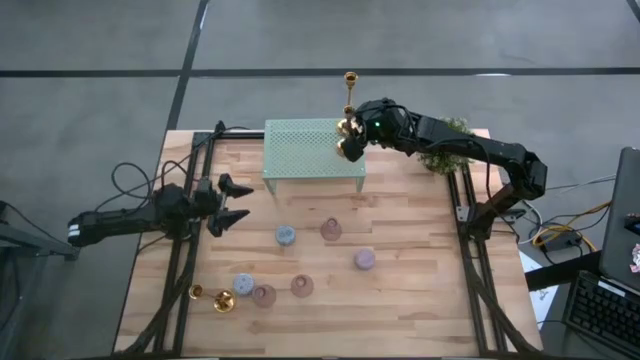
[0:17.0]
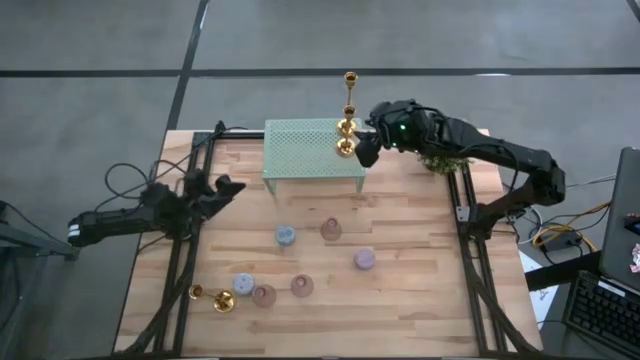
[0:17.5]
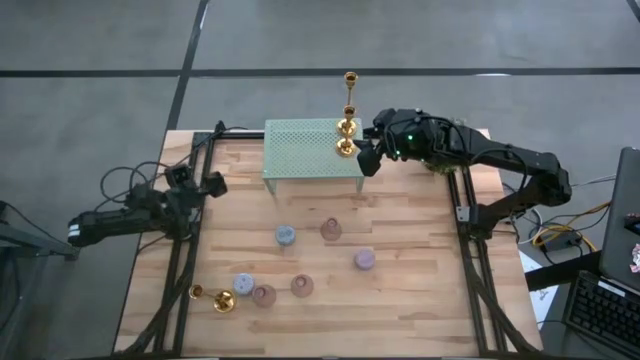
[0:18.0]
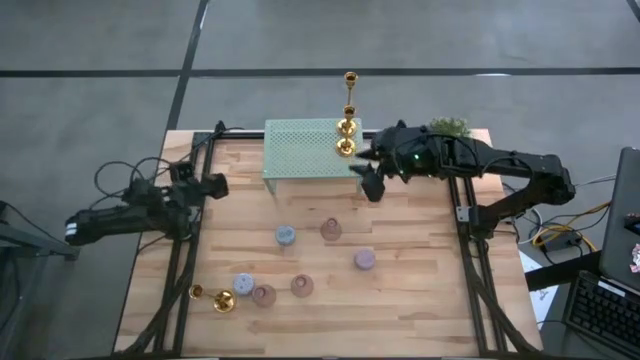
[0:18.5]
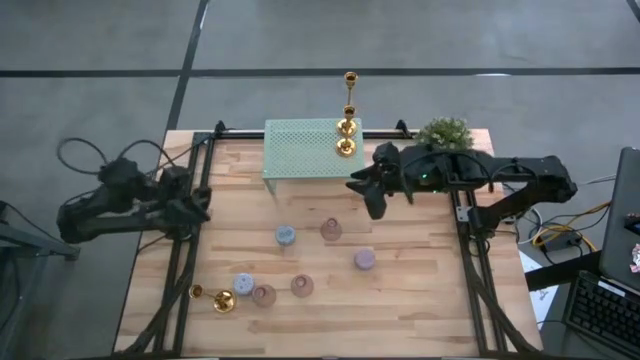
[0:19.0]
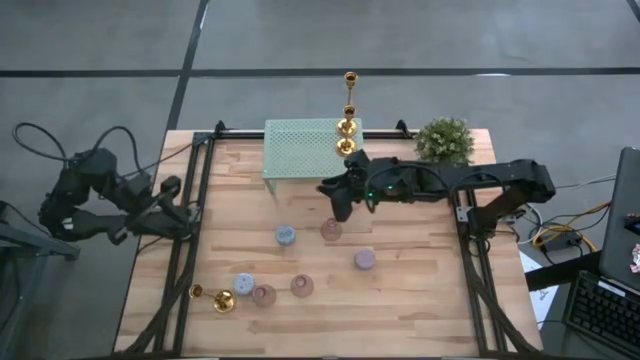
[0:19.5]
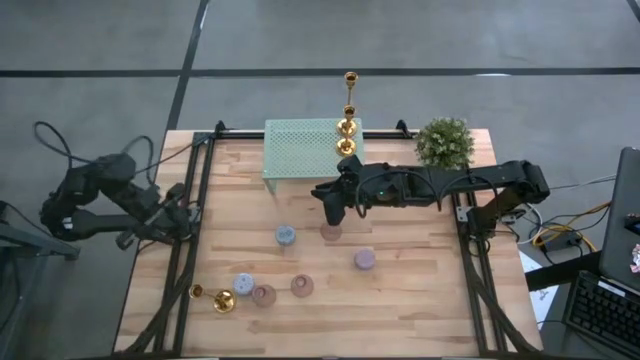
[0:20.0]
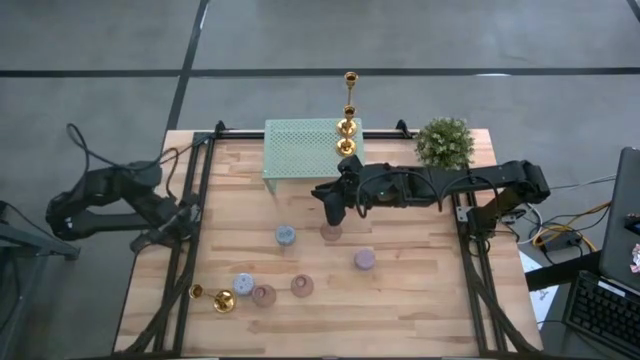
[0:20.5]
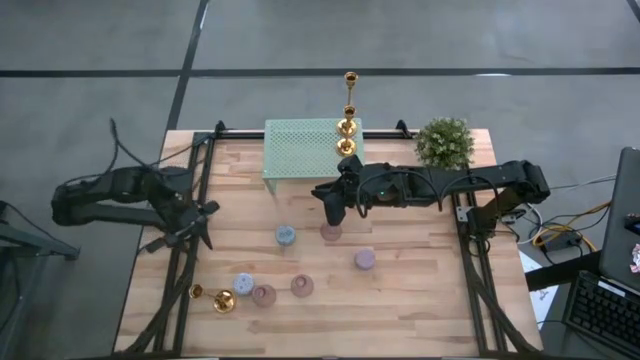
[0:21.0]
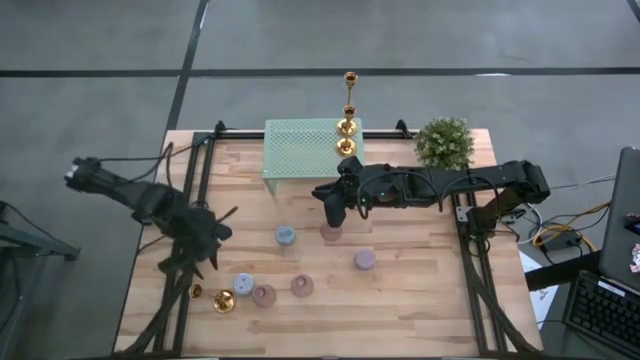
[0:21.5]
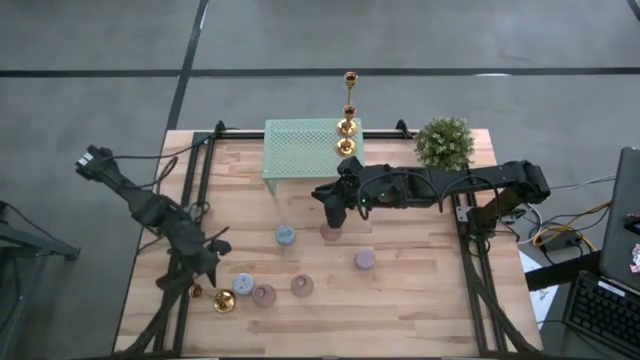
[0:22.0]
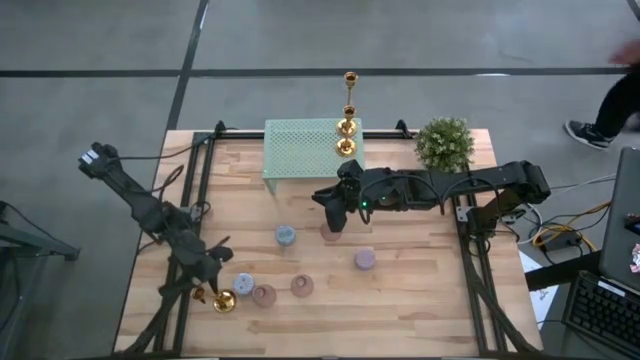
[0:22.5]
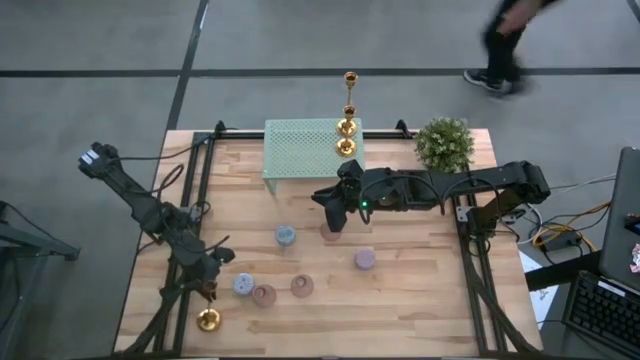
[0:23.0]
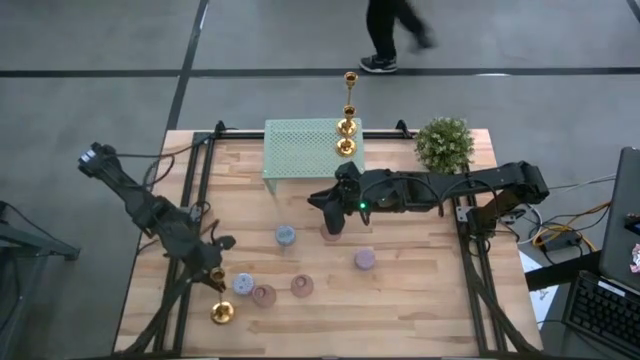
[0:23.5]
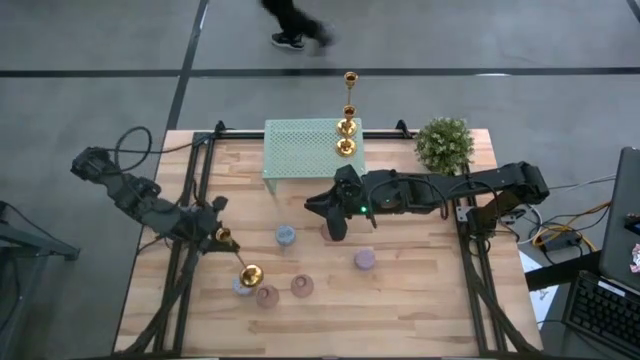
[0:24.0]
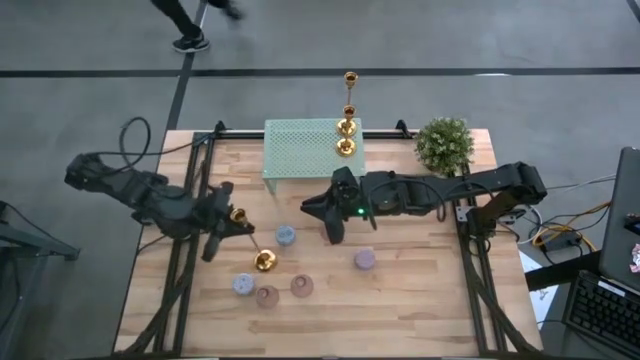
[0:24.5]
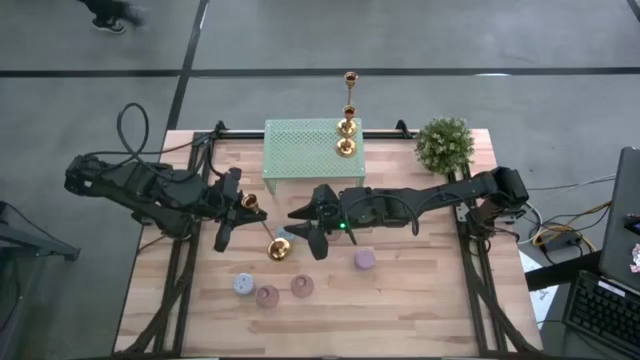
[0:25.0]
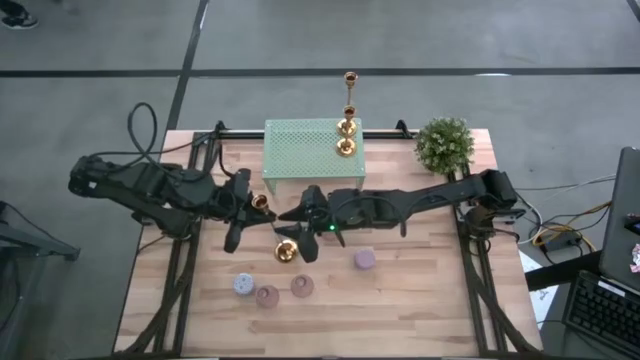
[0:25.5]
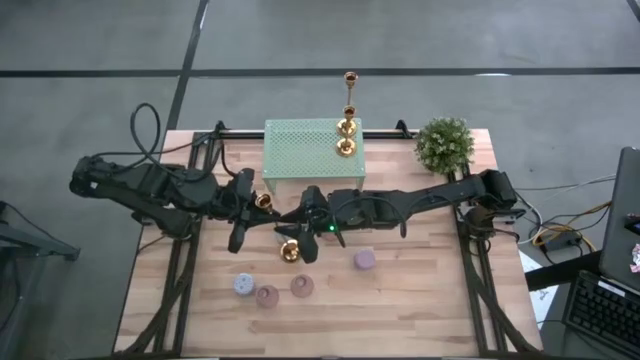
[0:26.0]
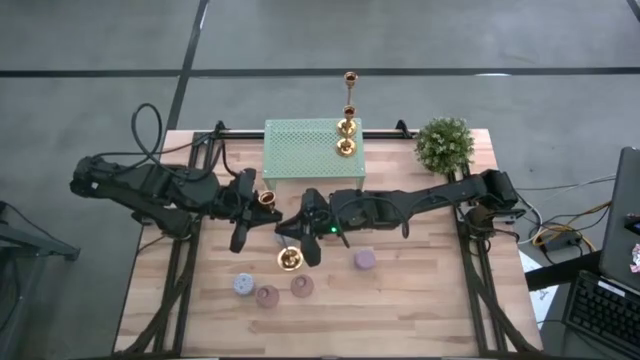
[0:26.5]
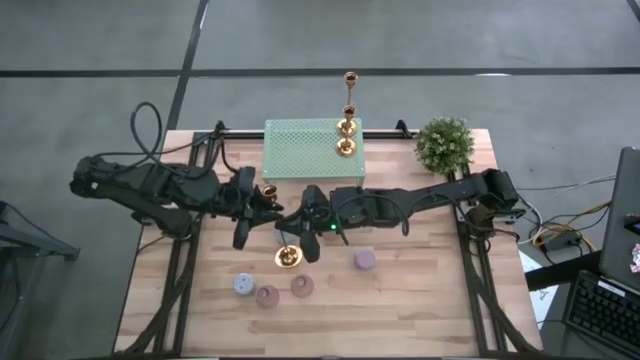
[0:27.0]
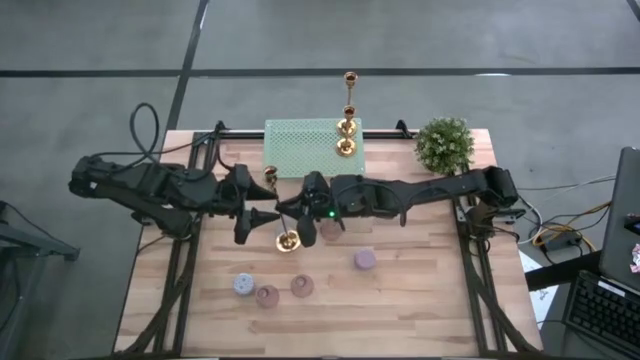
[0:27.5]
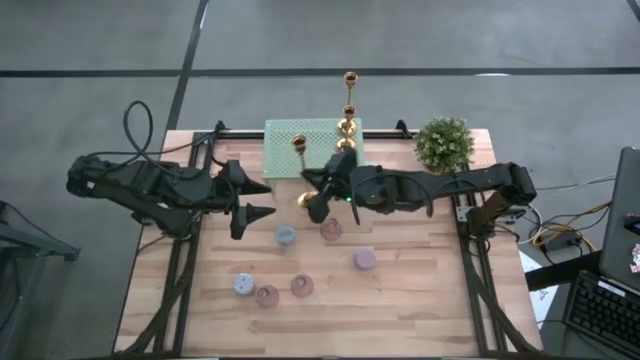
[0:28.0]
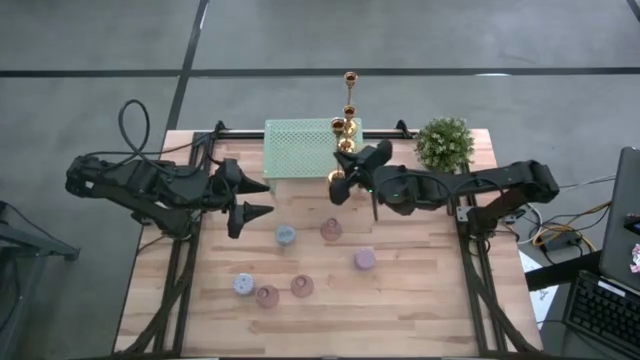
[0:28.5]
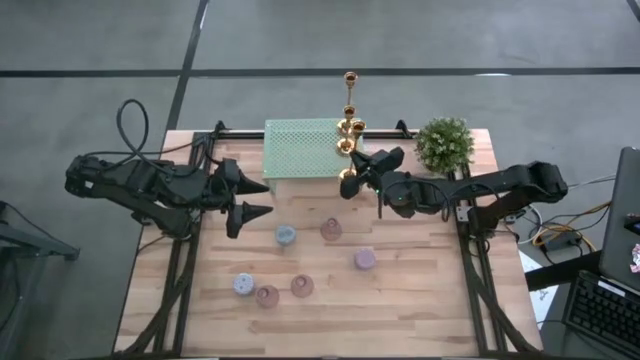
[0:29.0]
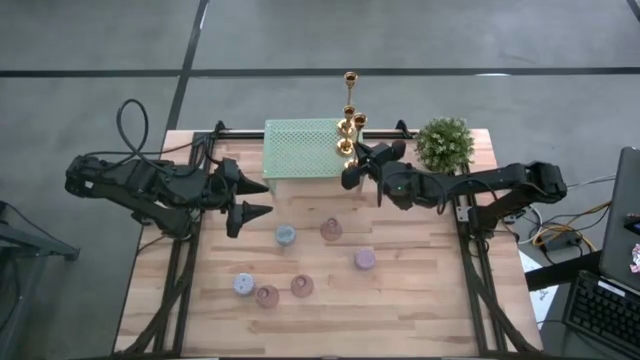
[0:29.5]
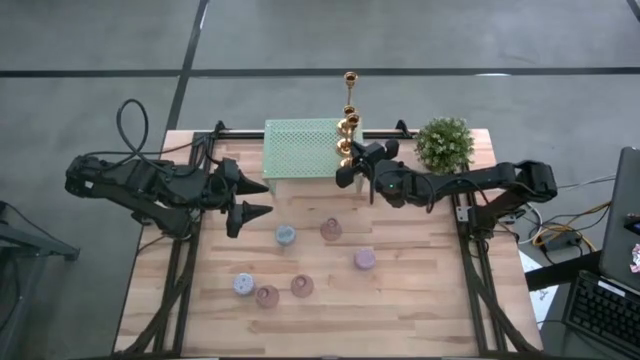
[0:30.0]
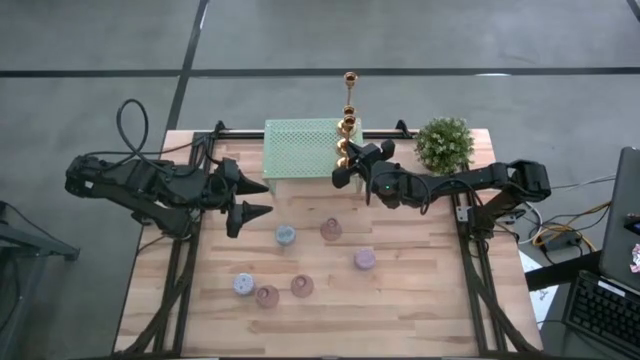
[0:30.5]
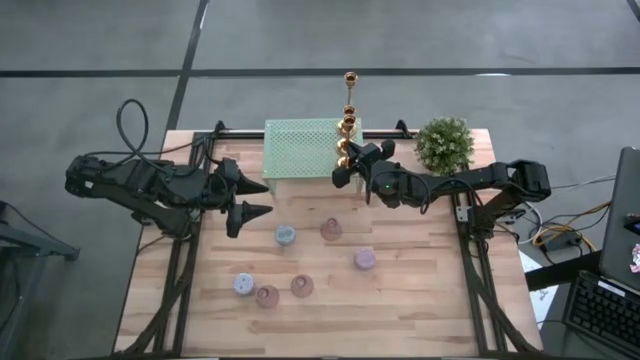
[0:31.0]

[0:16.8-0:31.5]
Task: Pick & Place candle stick holders
Put the gold candle holder aligned with the other gold candle holders on the shelf

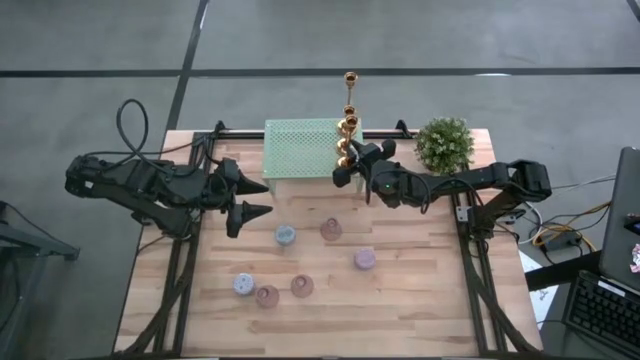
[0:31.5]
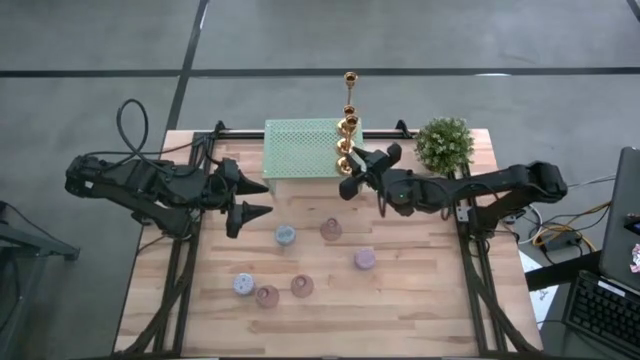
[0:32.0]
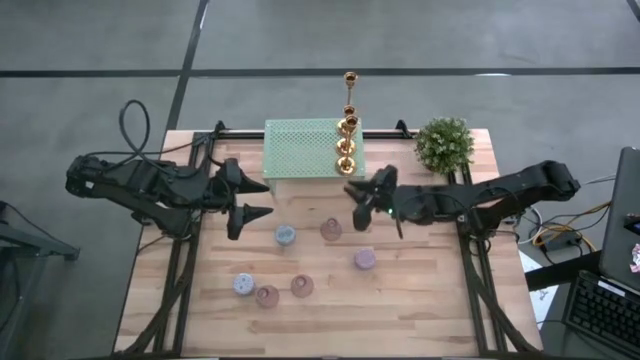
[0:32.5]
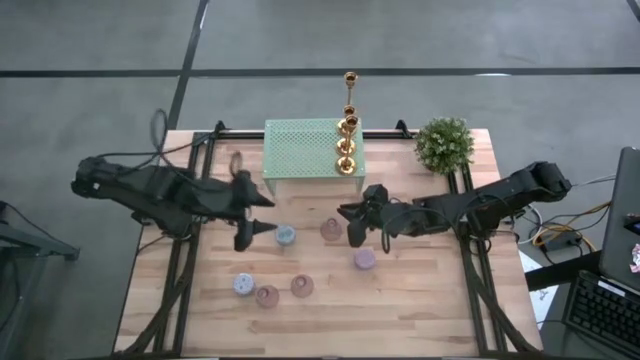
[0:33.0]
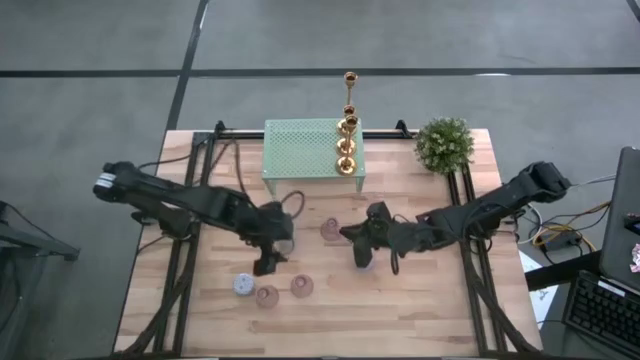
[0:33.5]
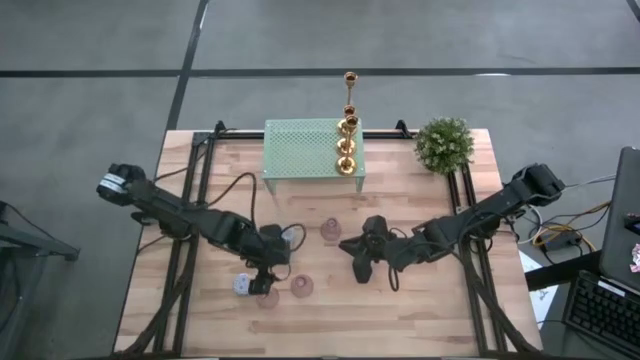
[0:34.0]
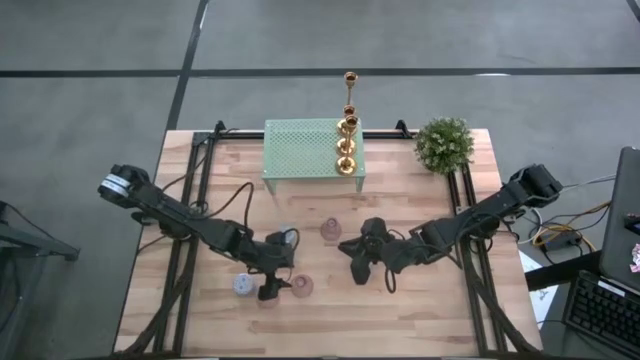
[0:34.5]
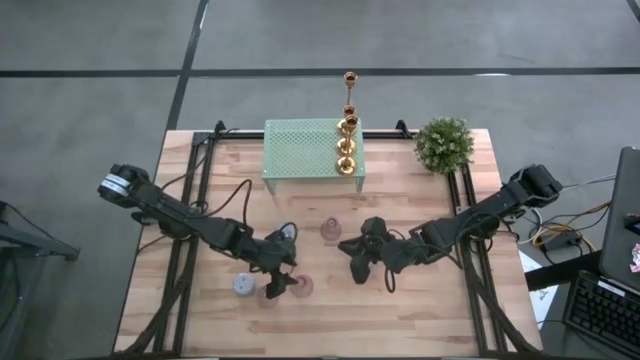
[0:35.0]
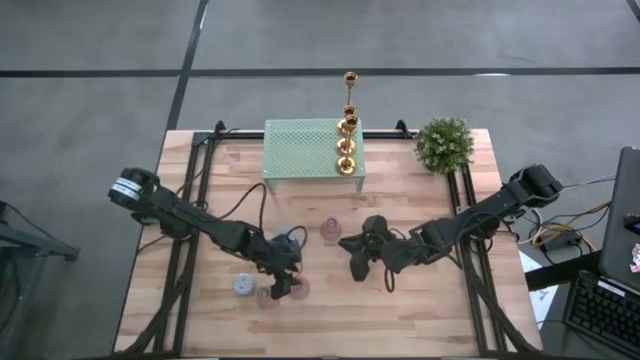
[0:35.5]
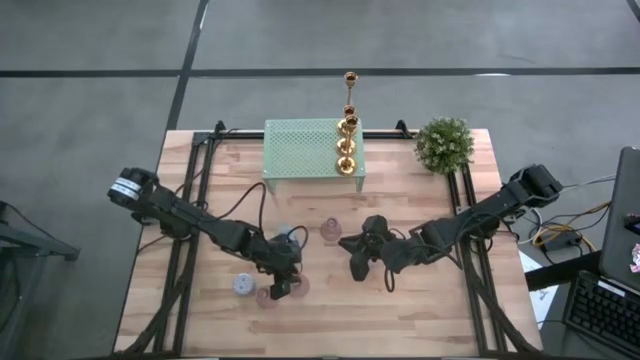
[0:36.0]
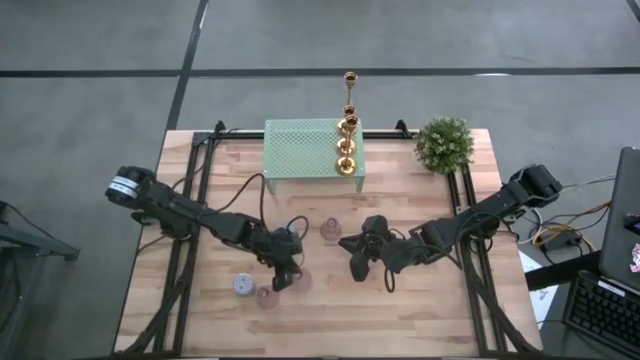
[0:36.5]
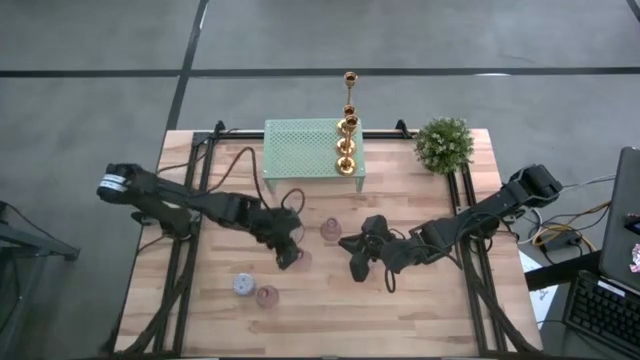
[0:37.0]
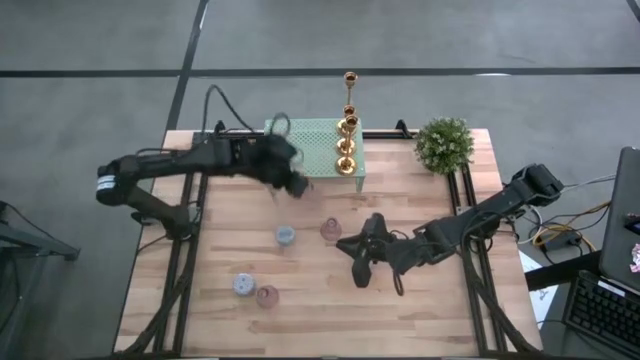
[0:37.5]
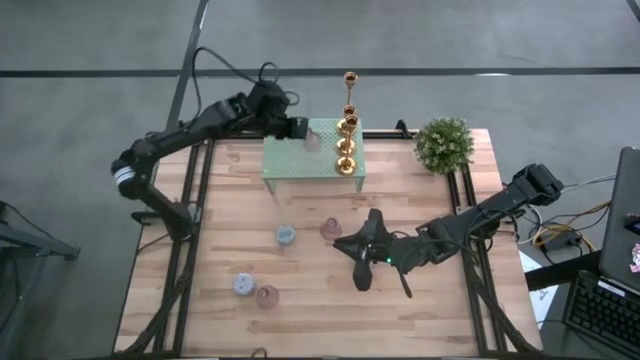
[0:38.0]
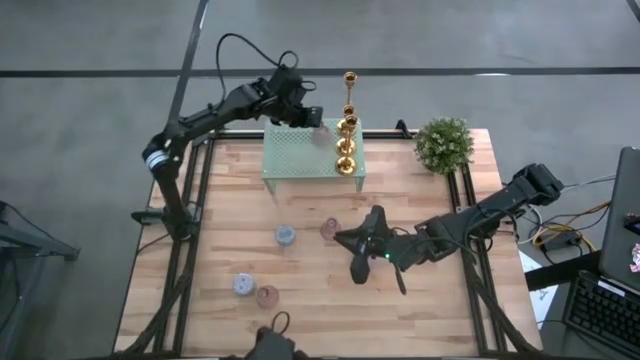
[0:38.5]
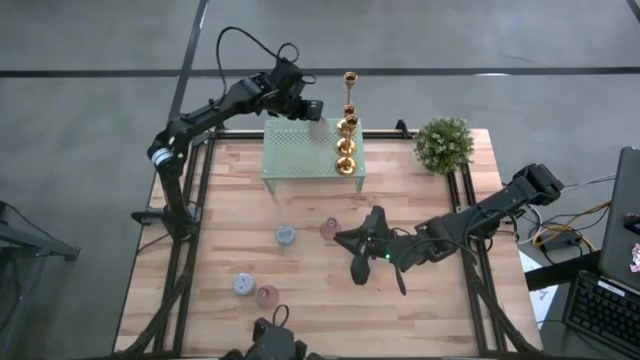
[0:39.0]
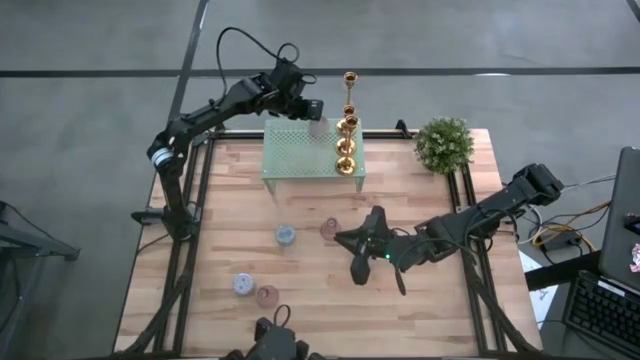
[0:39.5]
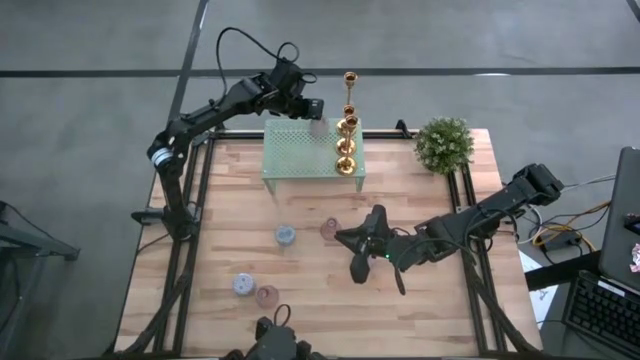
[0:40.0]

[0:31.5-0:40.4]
Put the bottom right pink glass candle holder on the shelf
